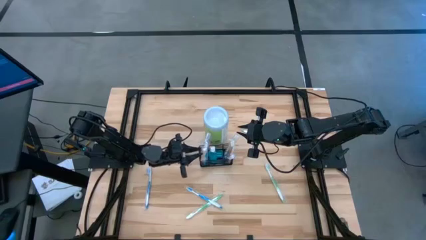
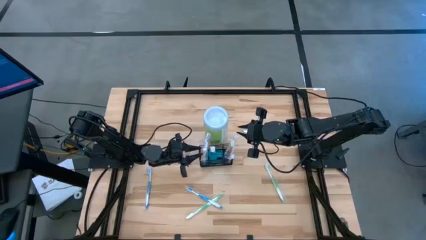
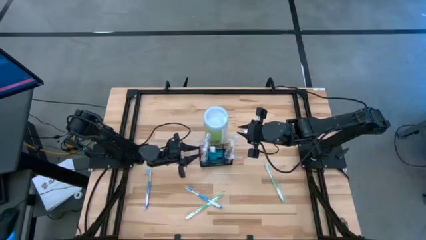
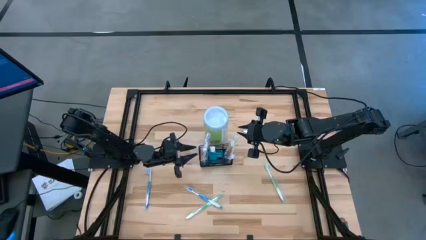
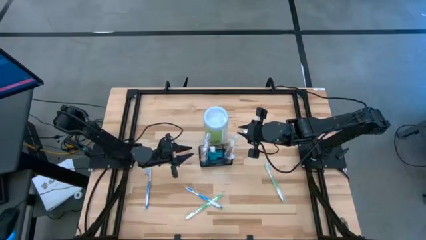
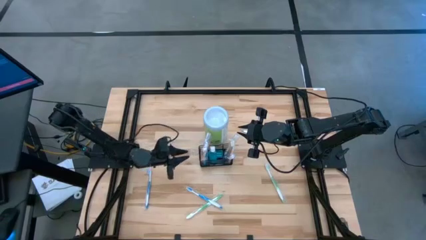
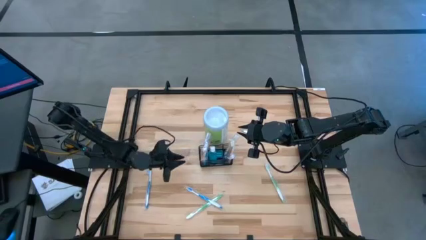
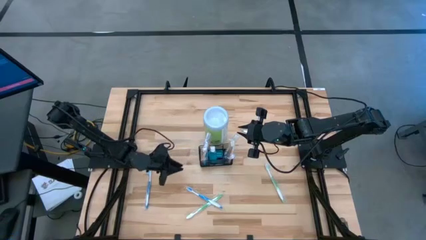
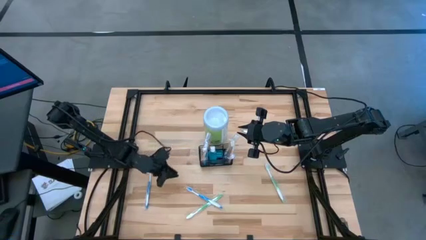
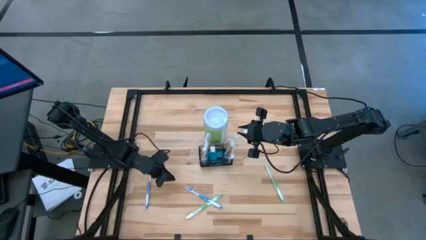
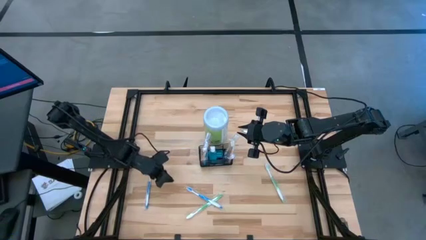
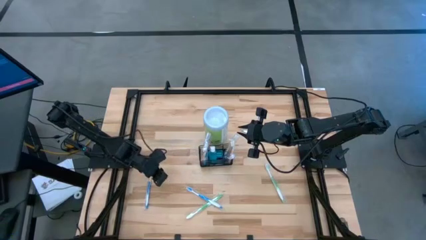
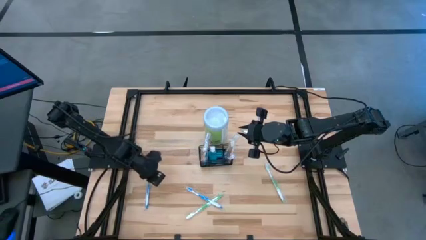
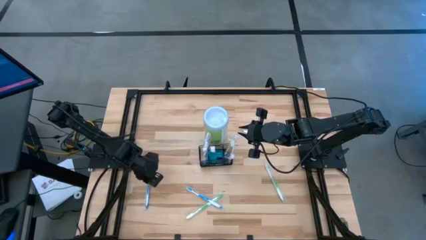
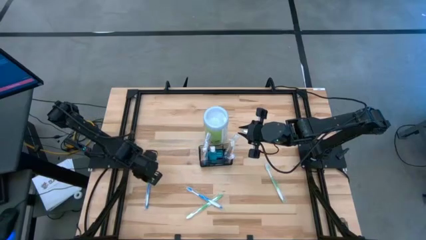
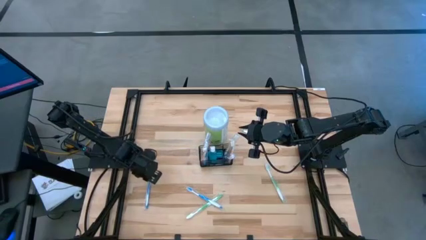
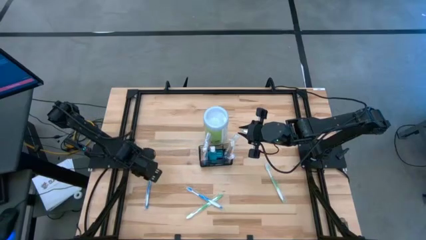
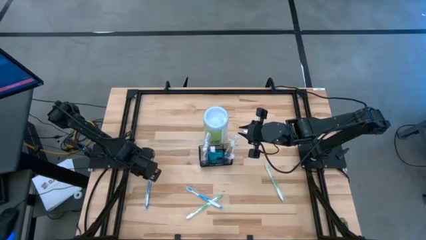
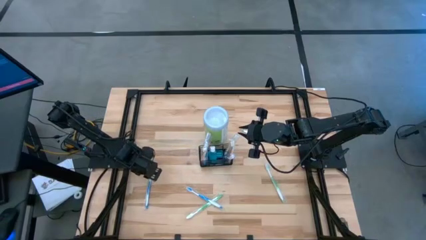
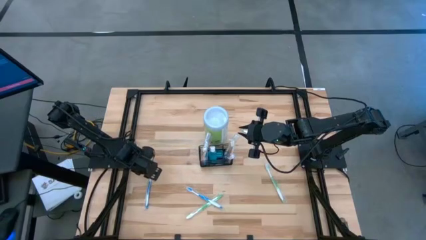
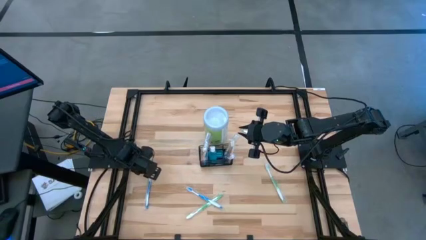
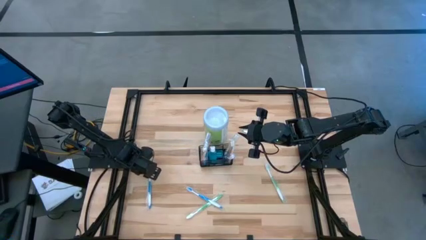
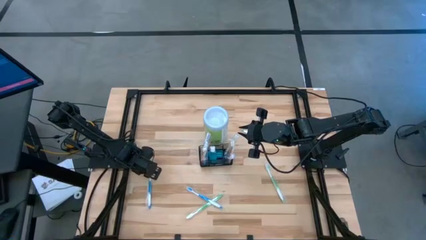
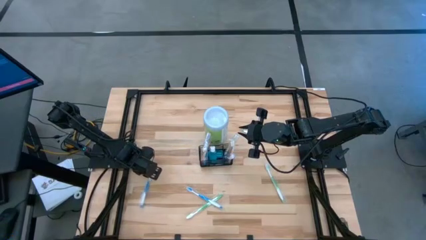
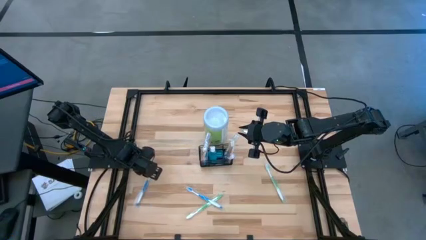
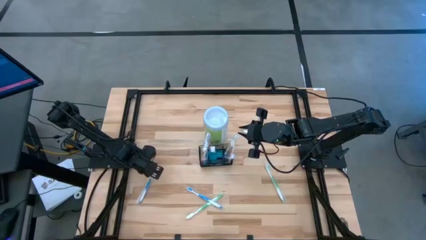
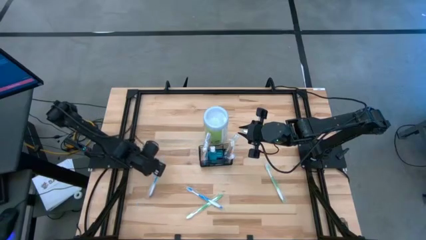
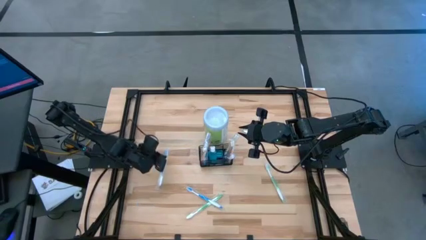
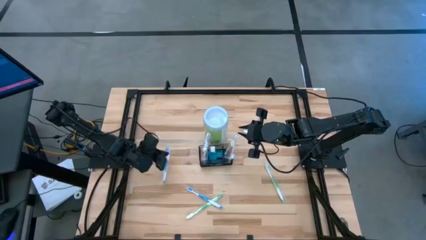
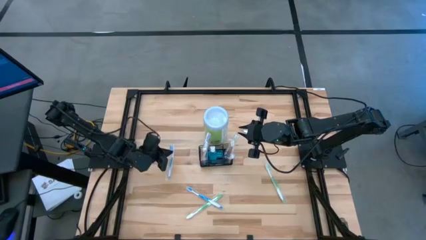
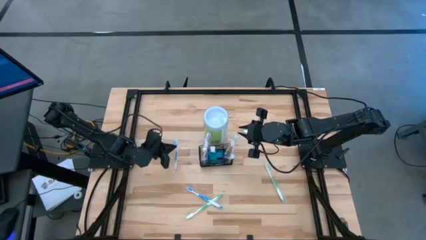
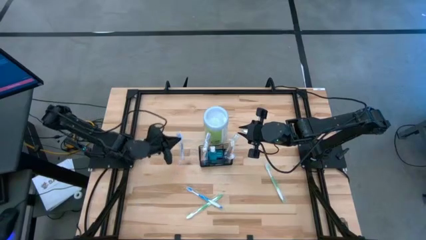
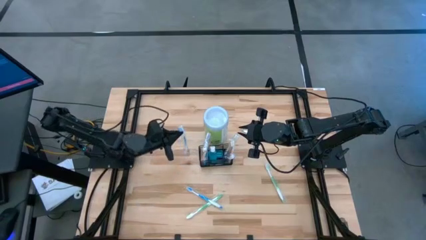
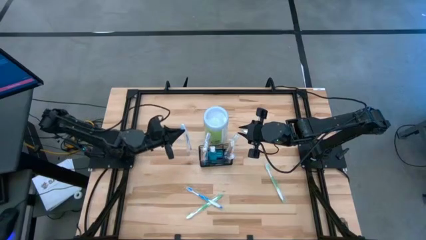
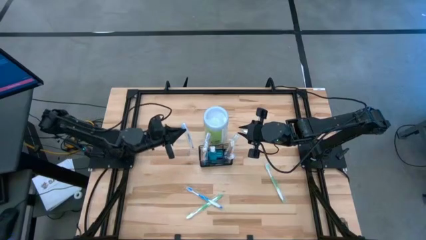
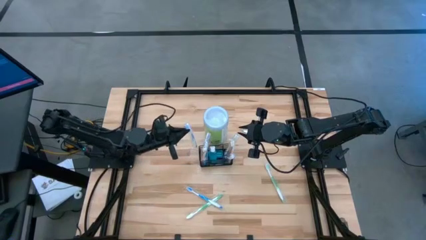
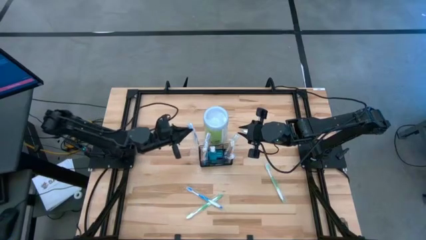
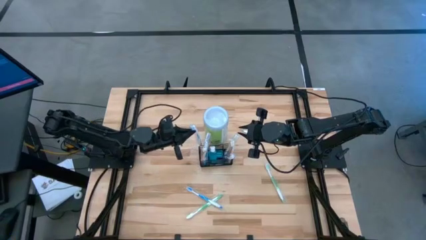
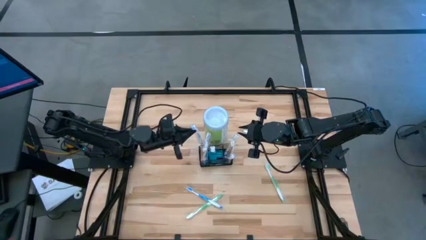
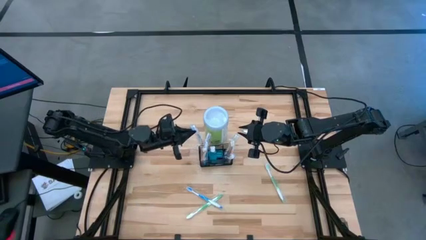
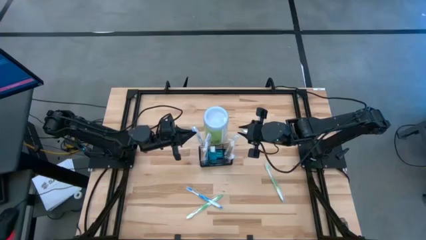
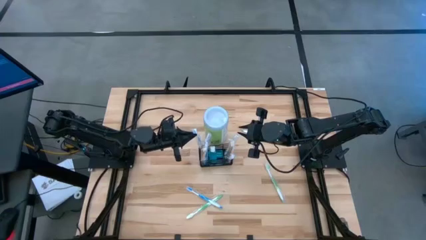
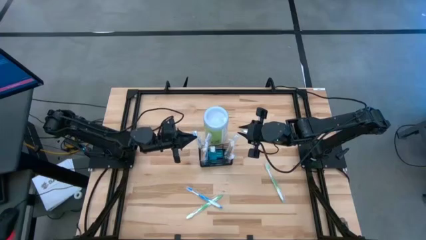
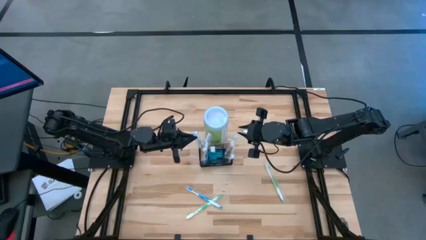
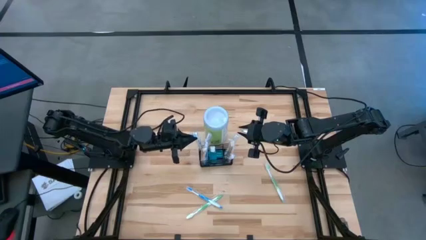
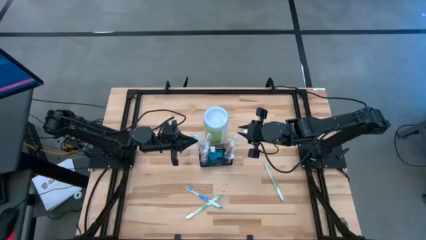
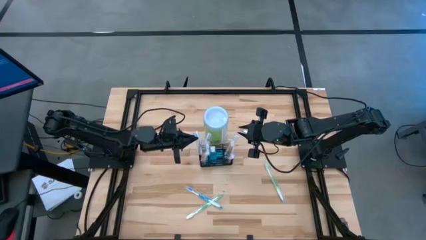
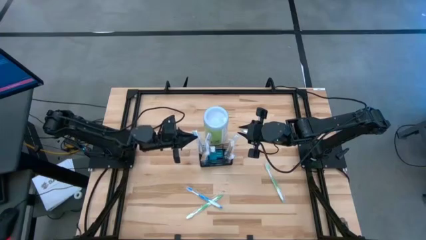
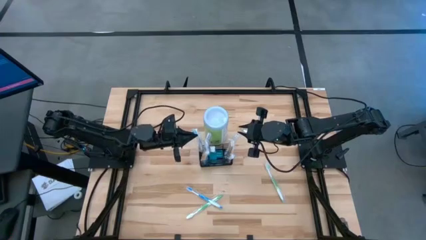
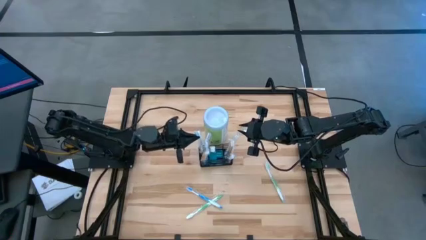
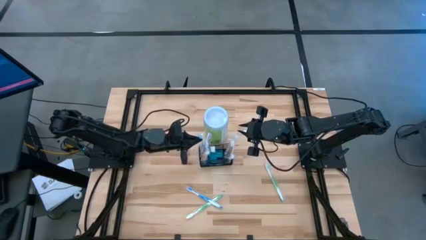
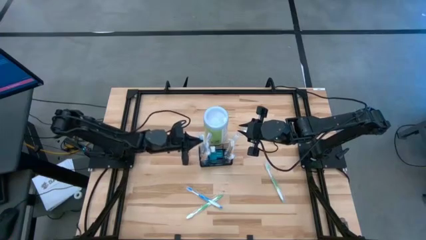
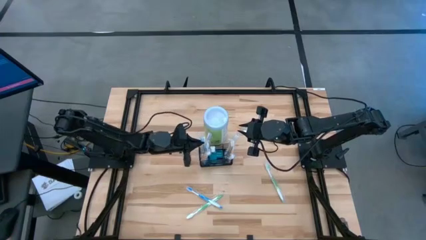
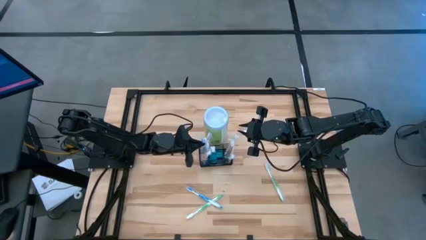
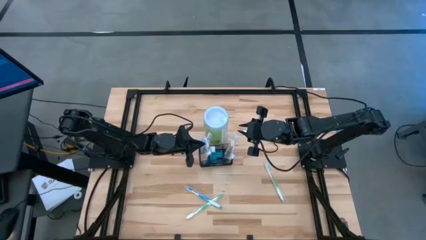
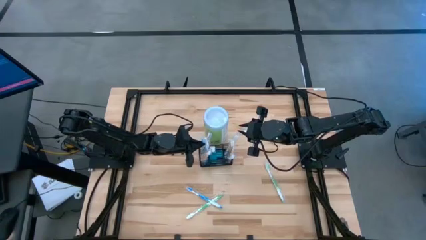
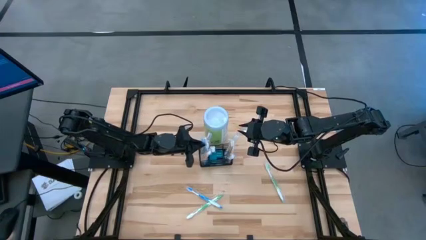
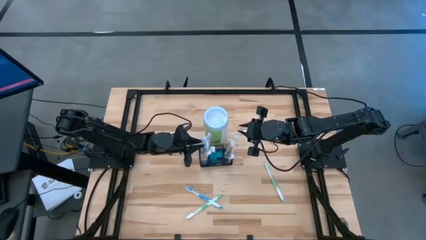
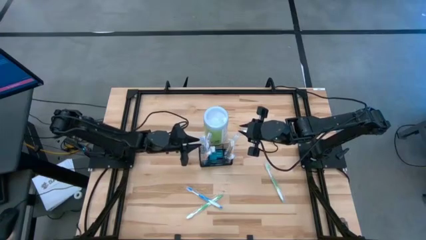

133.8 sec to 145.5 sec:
Task: Pick & Place toothbrushing station
Put the left blue toothbrush into the wire organizer

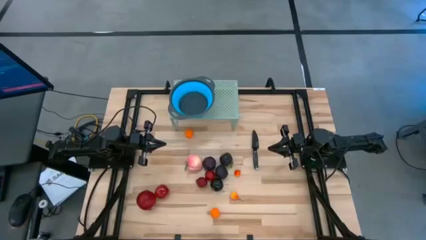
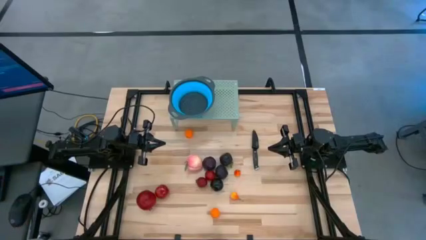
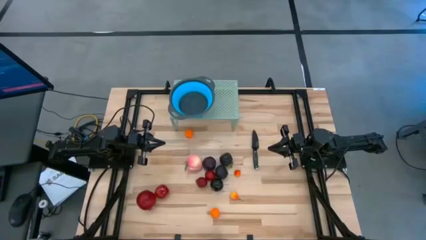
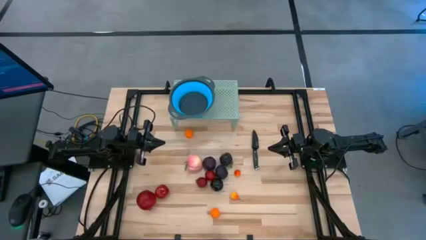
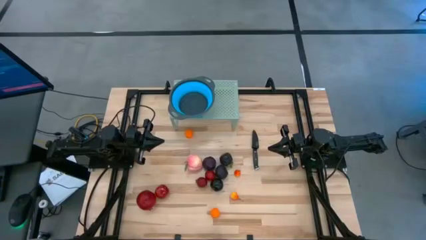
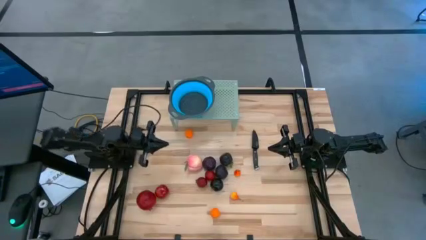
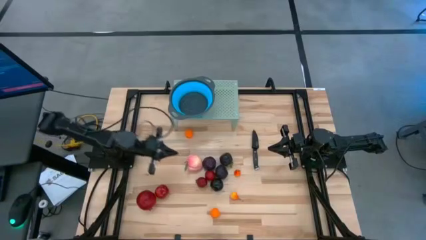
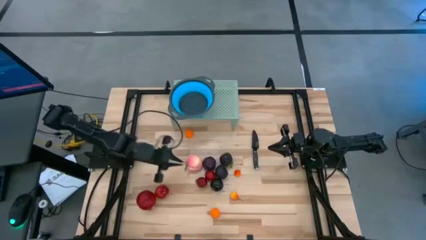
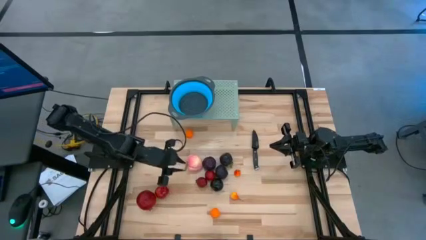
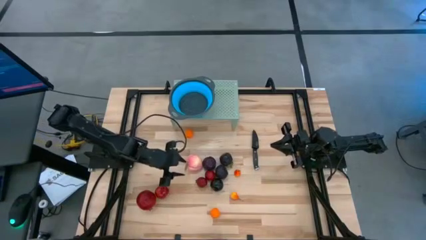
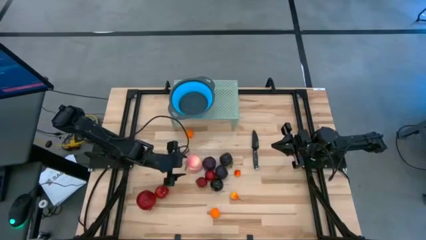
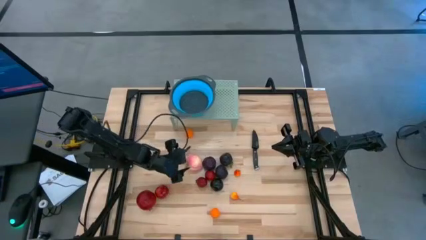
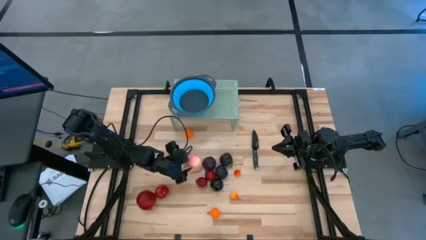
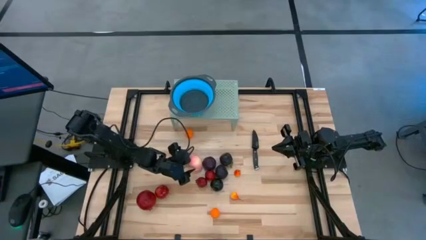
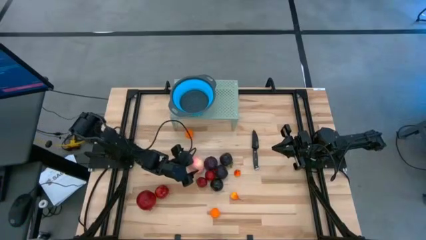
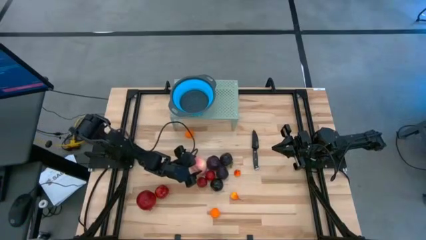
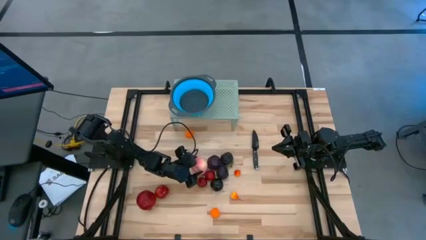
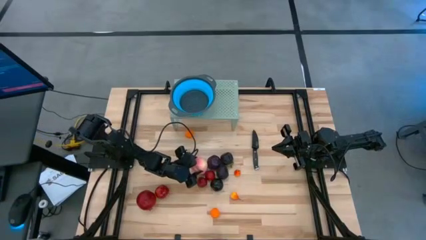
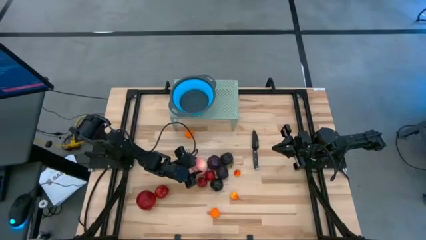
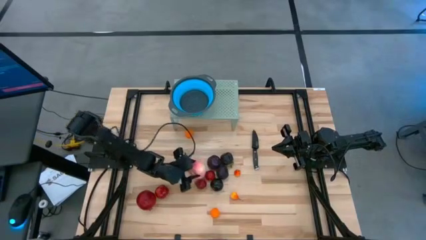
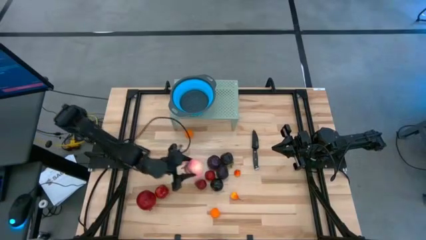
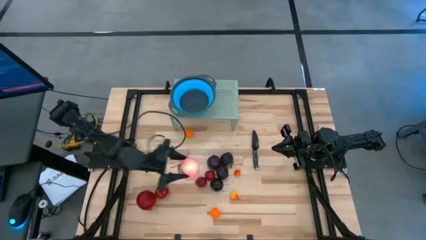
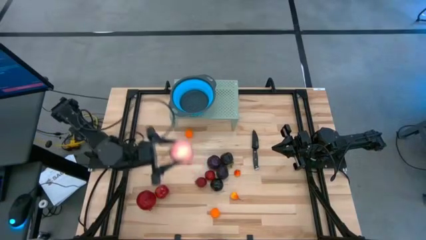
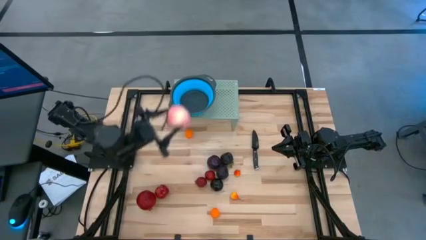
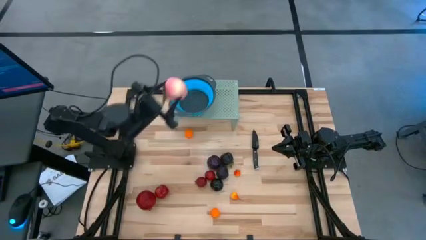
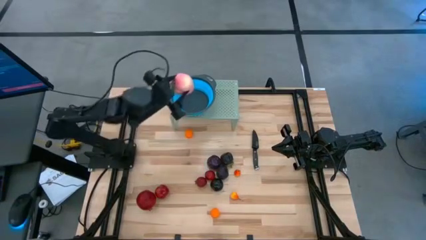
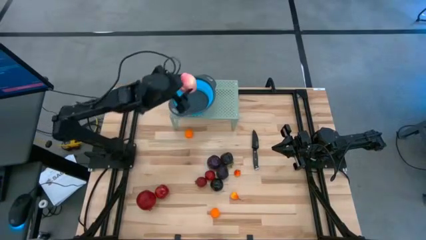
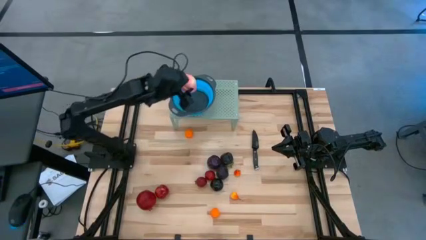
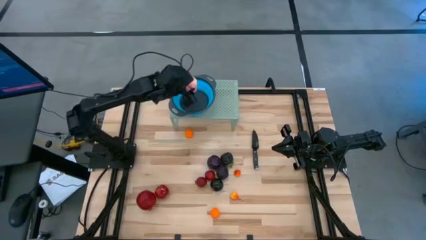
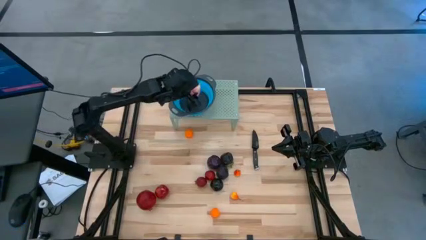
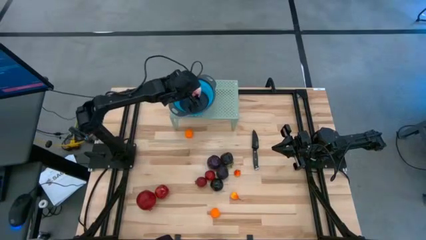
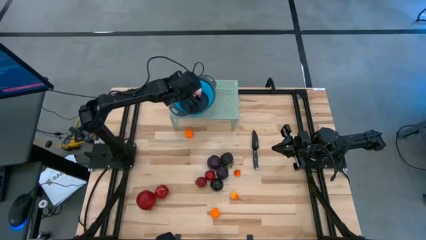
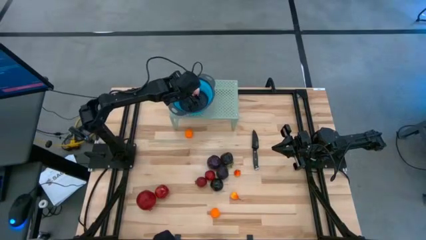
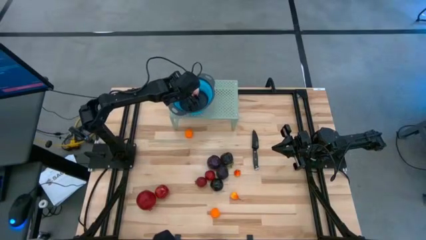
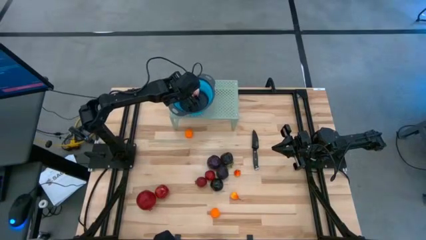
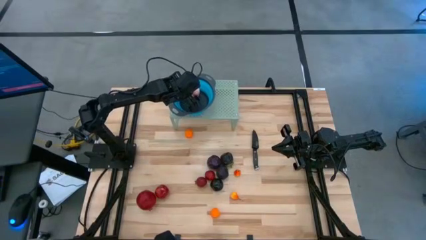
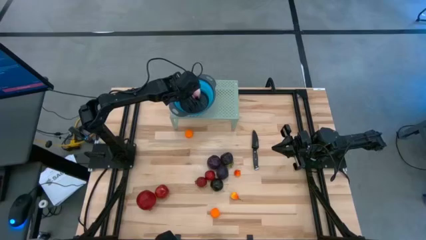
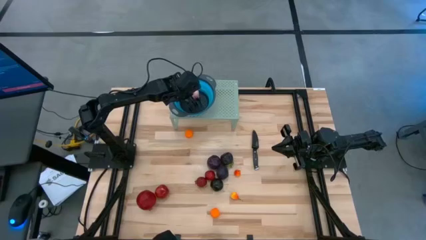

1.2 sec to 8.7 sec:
Task: Pick & Place Fruit
Put the pink peach into the blue strainer bowl
